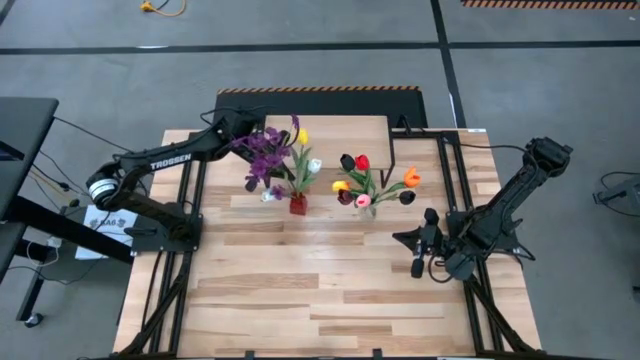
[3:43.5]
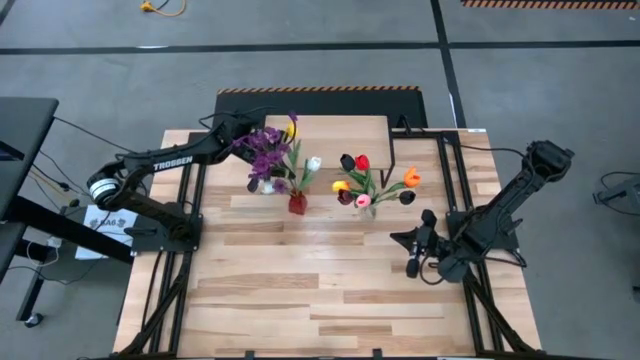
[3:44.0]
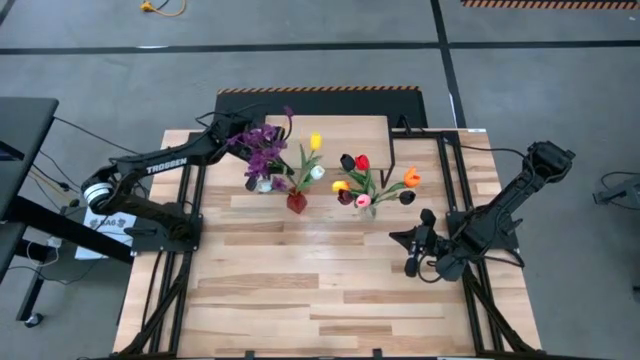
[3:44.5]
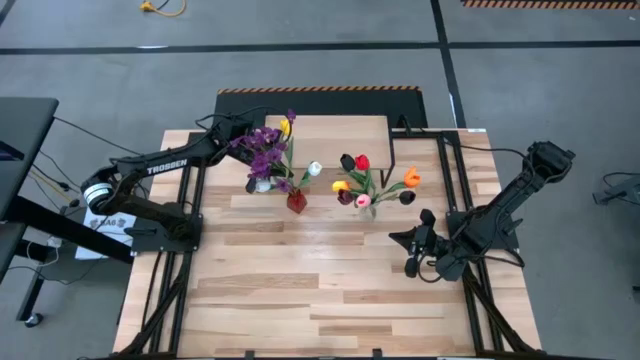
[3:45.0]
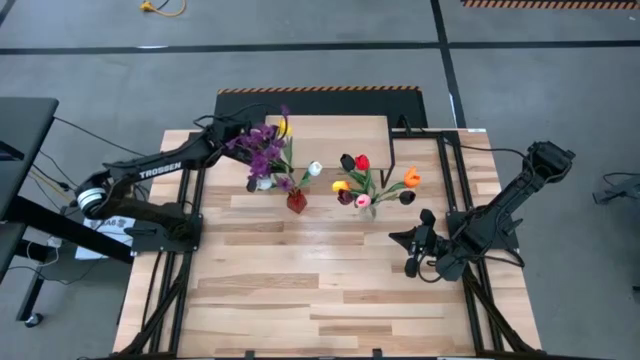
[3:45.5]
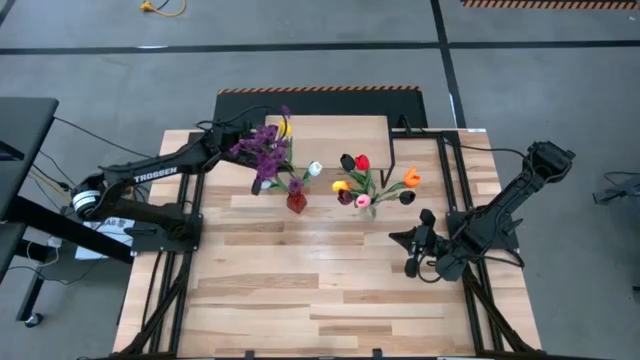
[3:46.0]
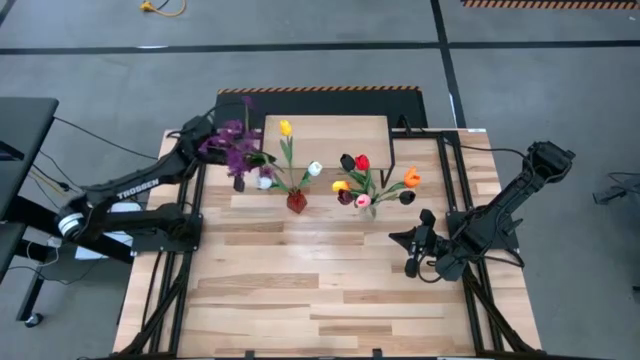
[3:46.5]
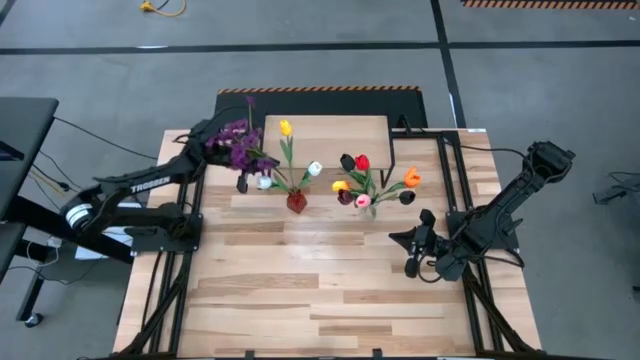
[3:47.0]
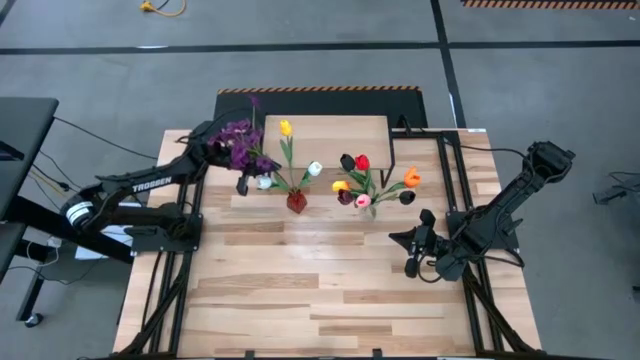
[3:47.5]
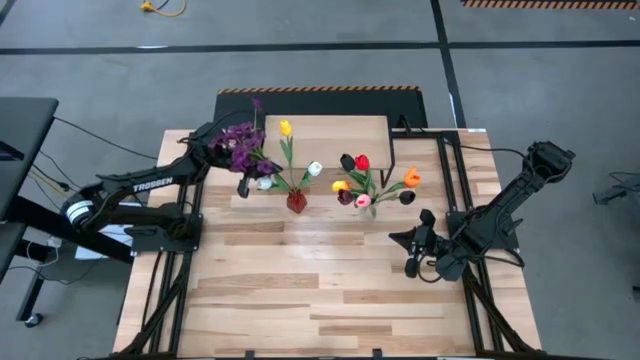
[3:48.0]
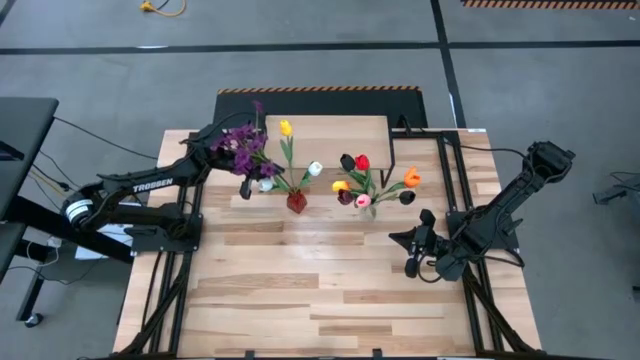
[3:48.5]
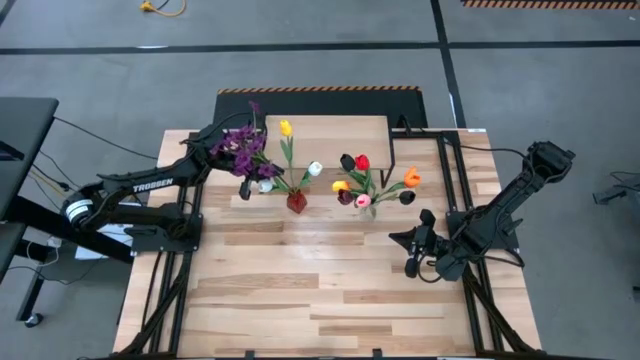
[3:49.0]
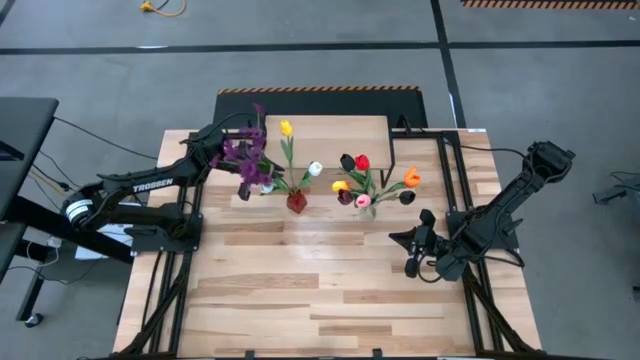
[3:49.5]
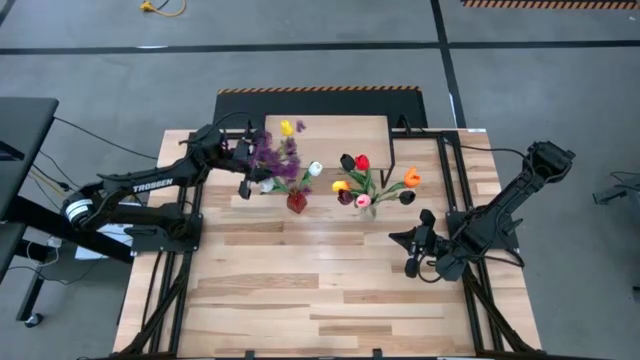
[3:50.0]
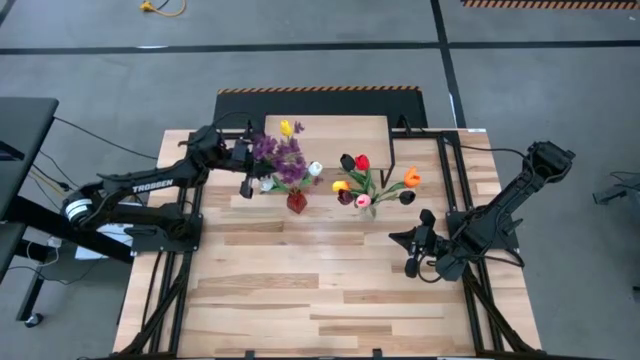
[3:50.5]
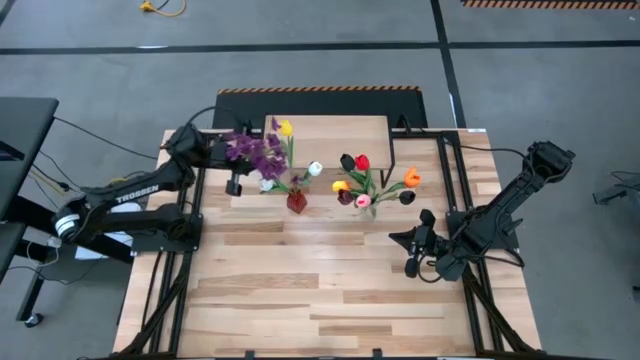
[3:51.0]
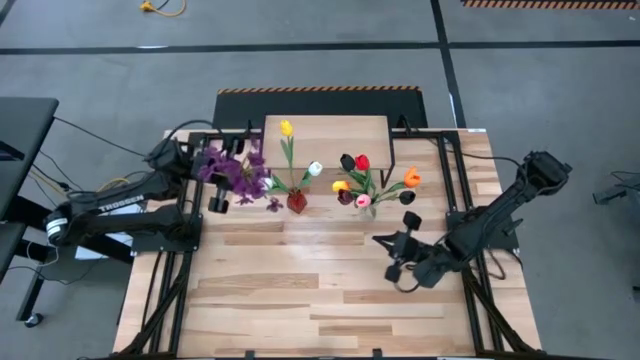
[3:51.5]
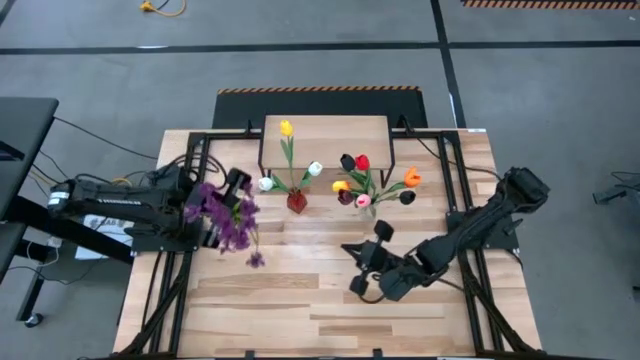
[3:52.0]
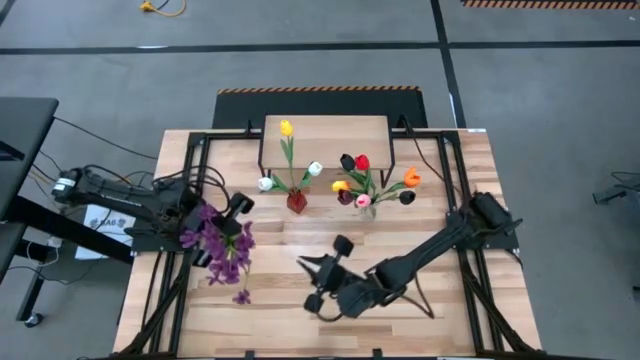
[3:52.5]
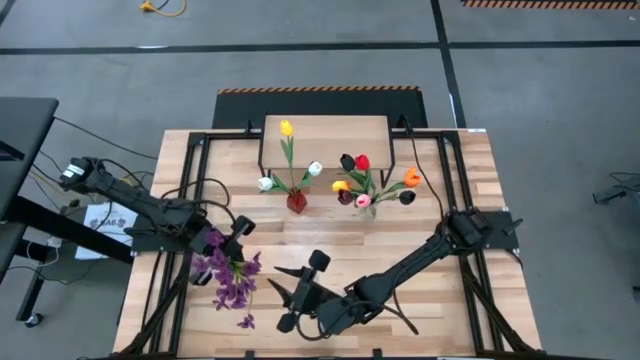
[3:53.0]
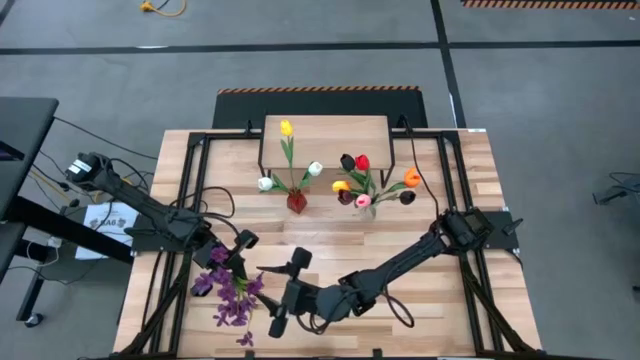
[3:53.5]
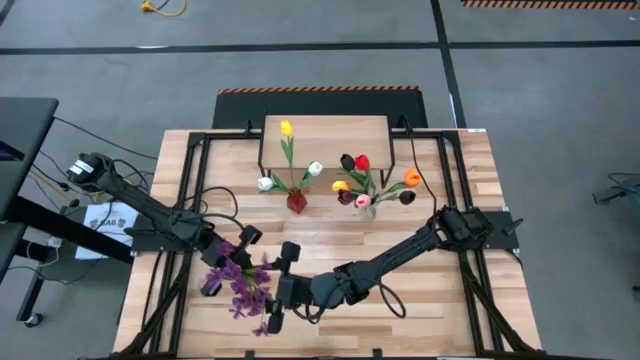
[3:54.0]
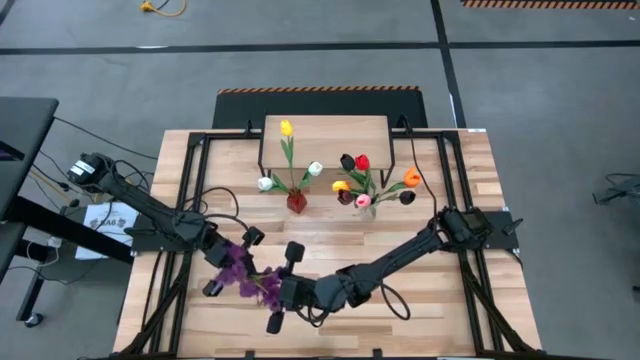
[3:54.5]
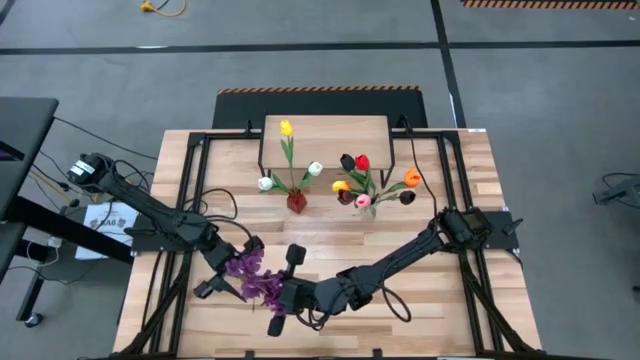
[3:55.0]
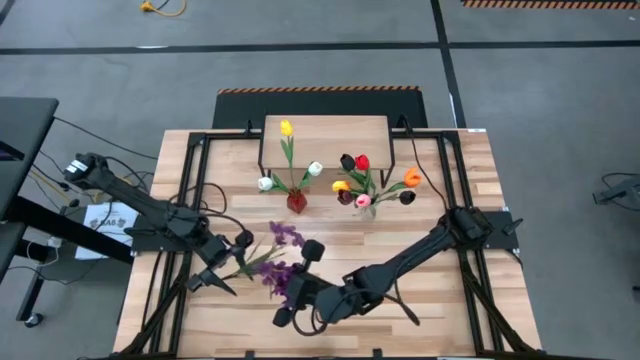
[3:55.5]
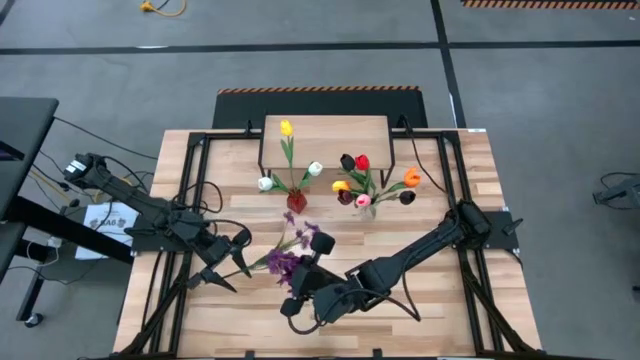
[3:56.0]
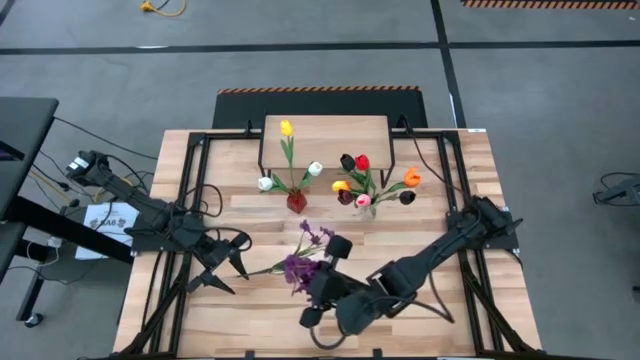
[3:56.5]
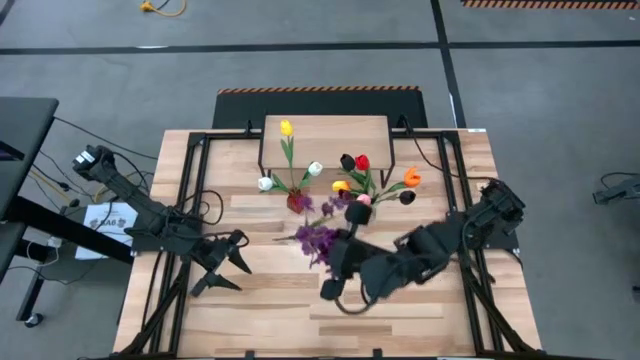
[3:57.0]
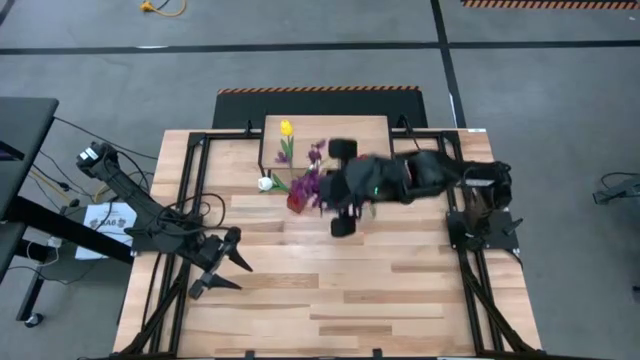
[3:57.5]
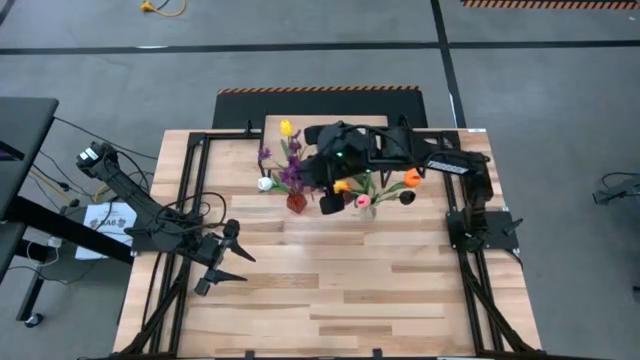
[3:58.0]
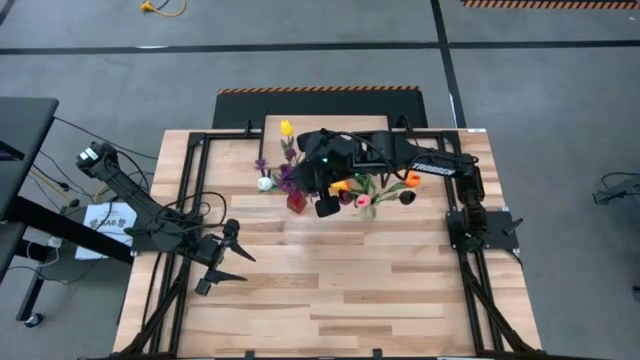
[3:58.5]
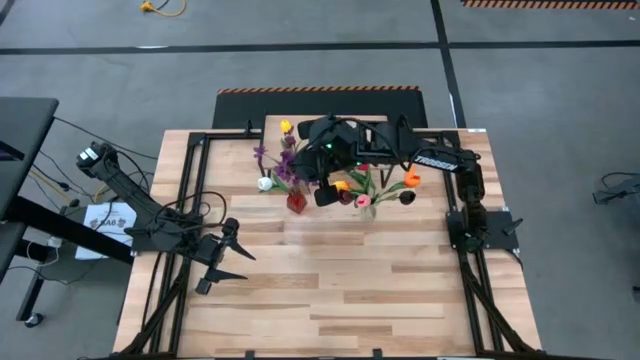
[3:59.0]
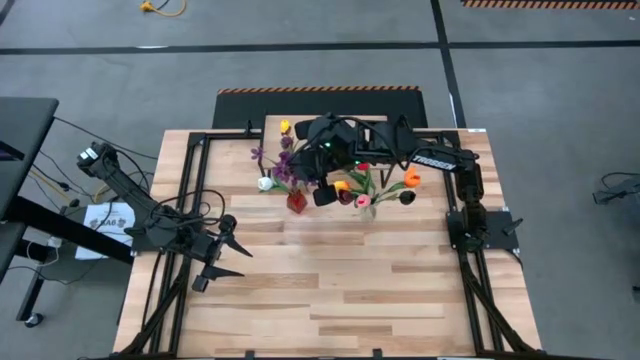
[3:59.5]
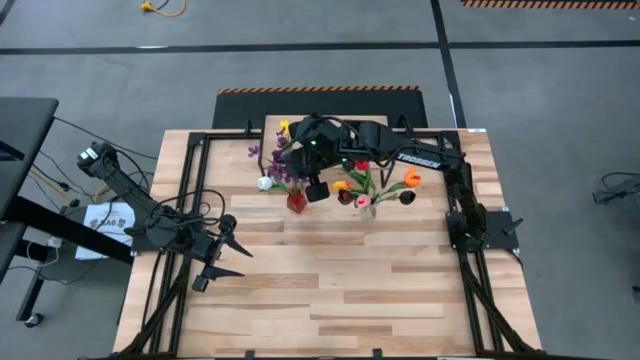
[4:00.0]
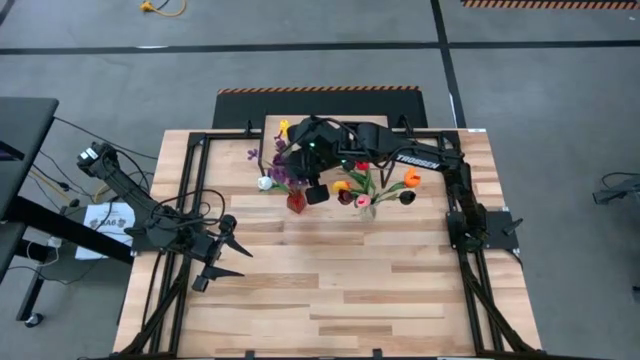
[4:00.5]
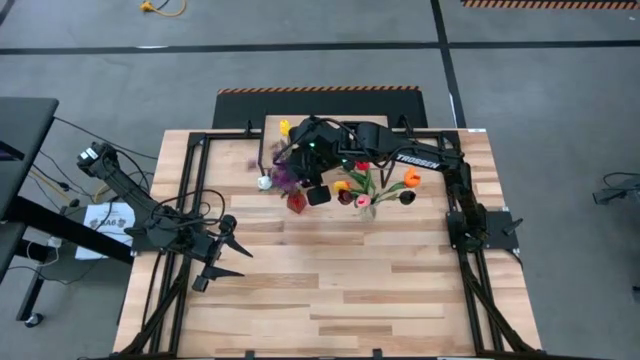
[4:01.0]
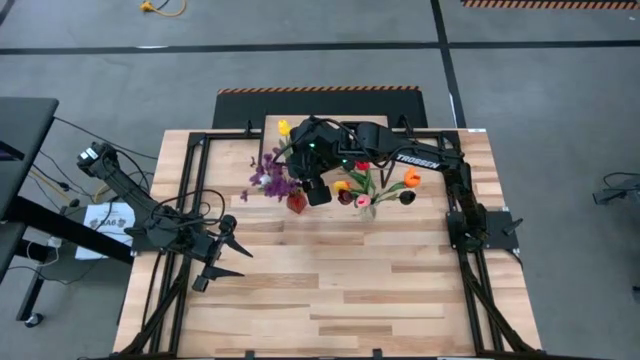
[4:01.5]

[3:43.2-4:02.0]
Task: Pick and place flowers into a vace then onto a shelf
Put the purple flower into the red vase
